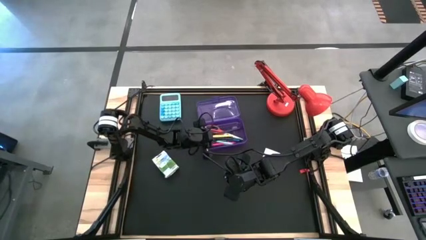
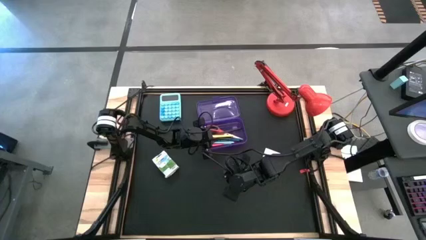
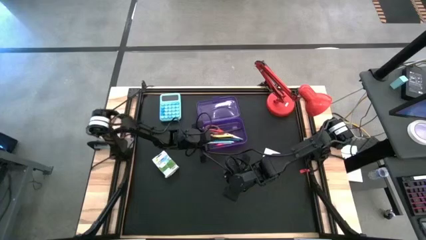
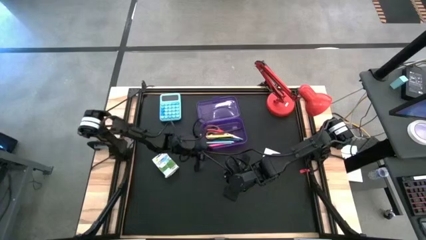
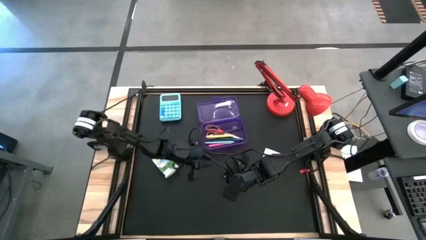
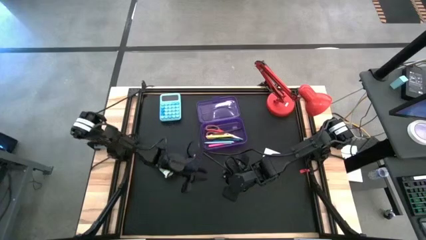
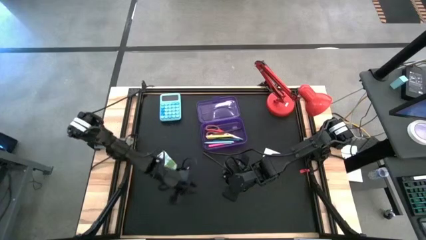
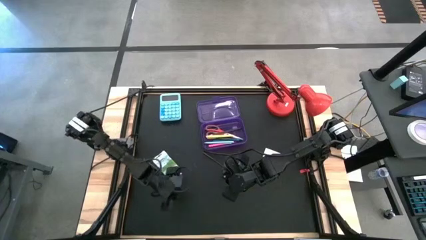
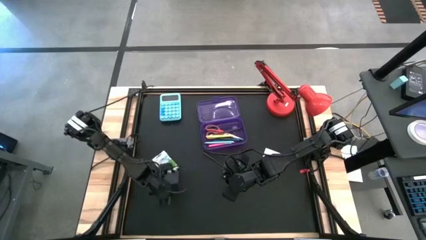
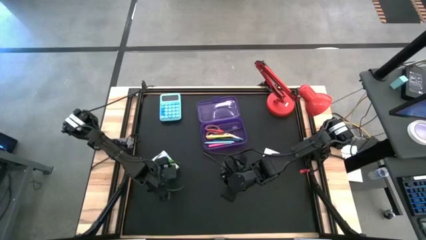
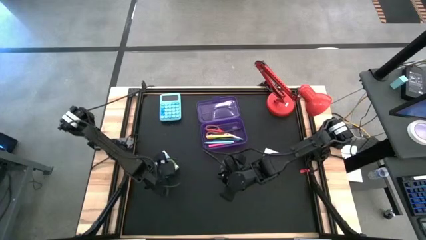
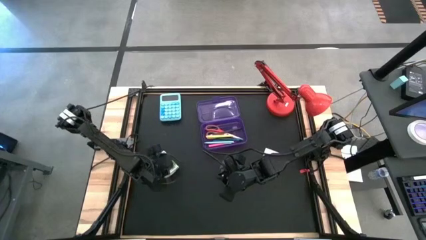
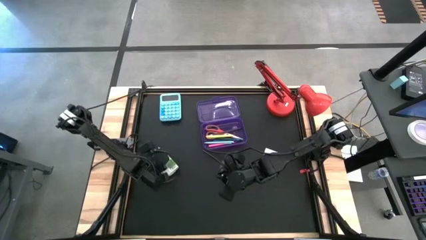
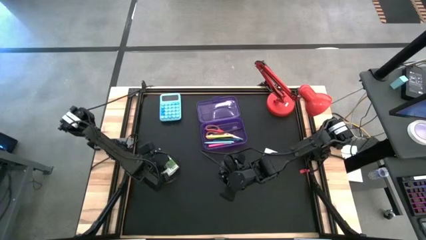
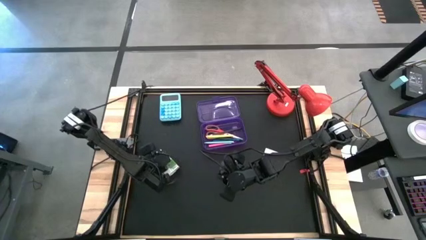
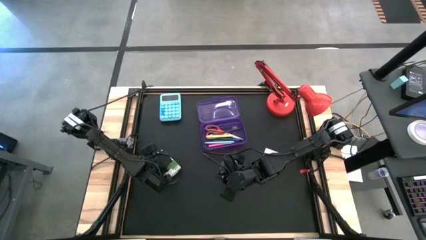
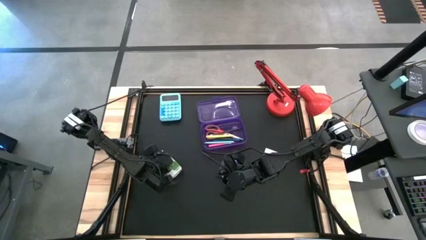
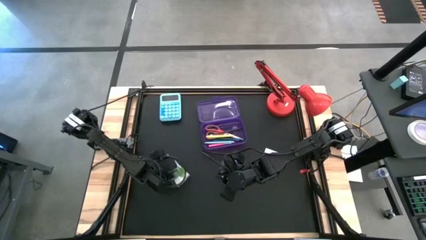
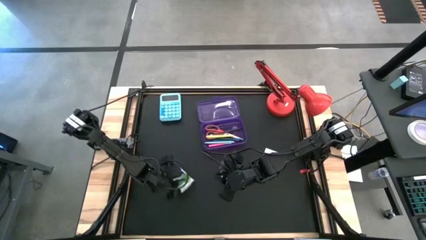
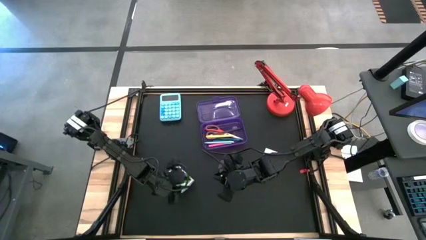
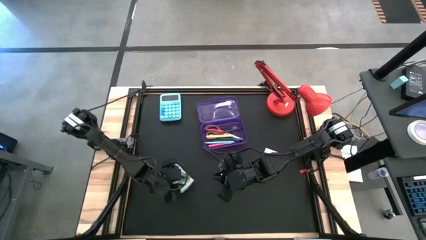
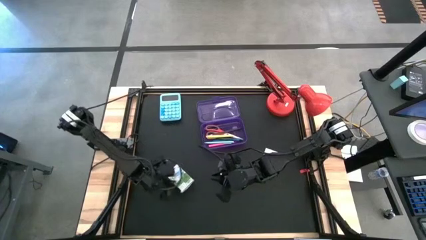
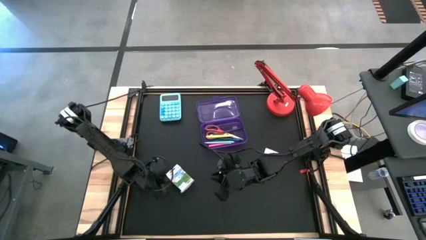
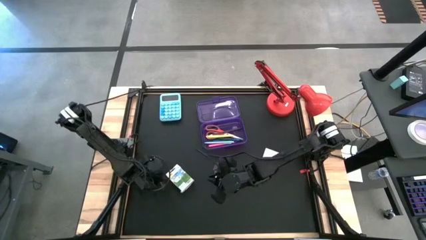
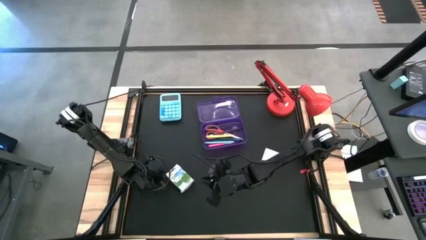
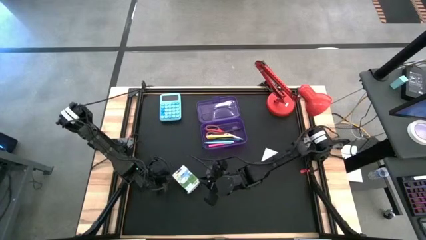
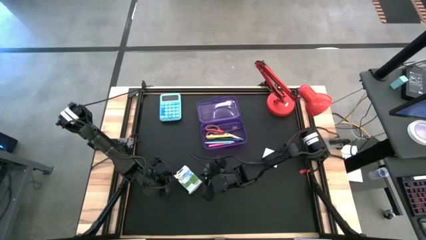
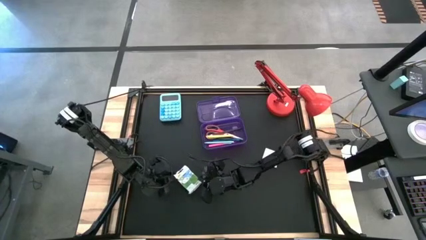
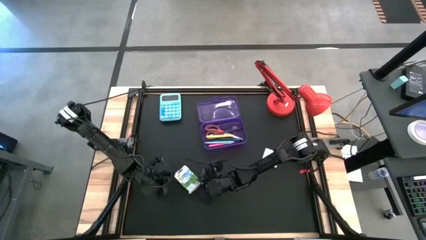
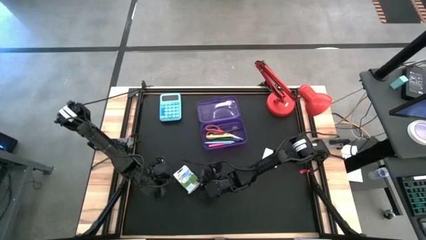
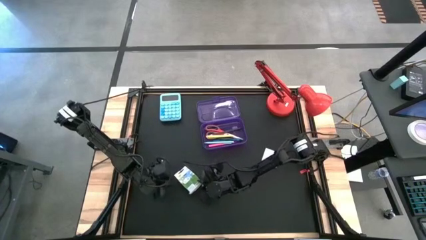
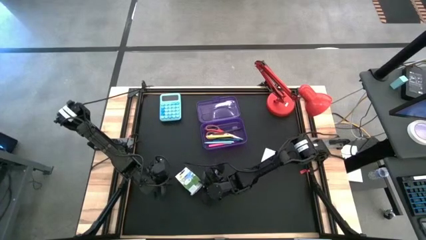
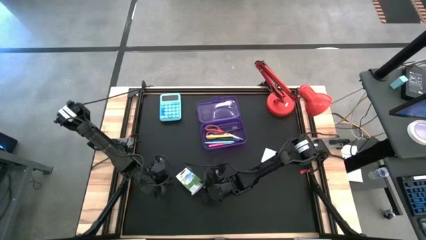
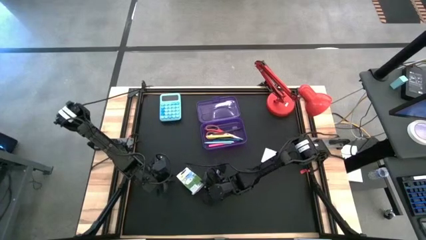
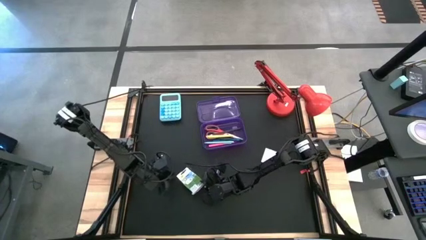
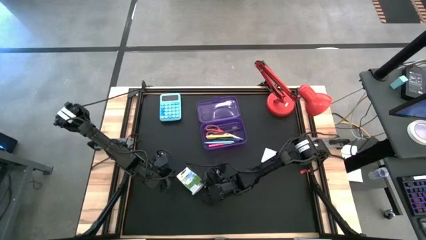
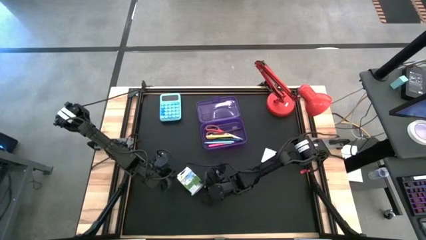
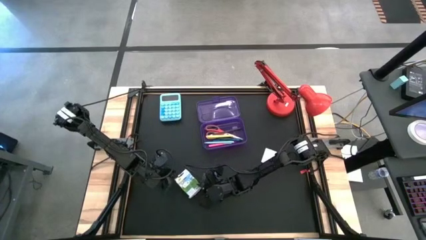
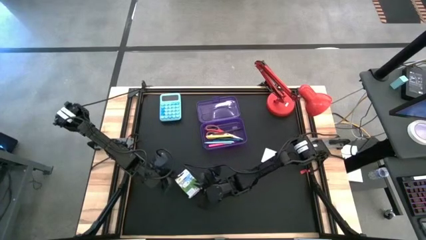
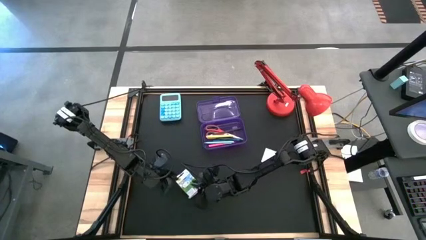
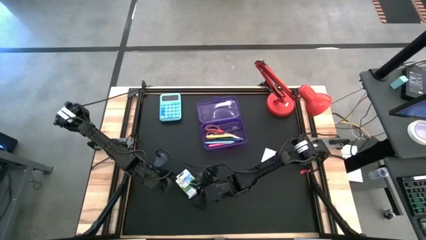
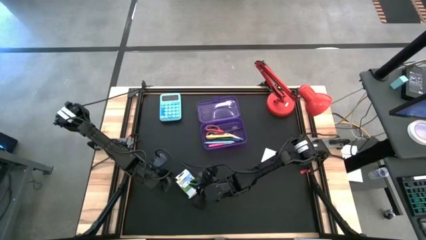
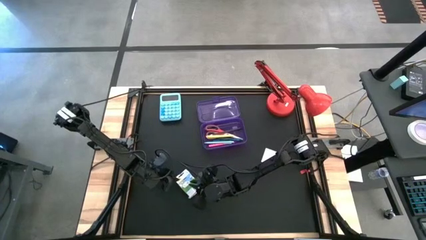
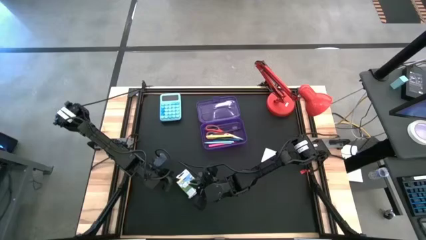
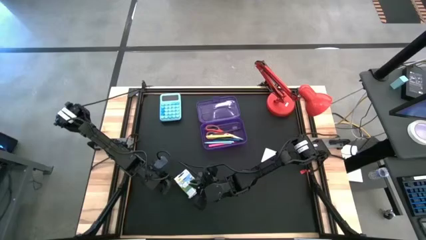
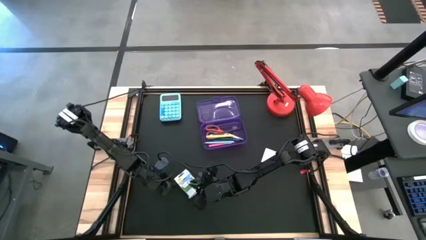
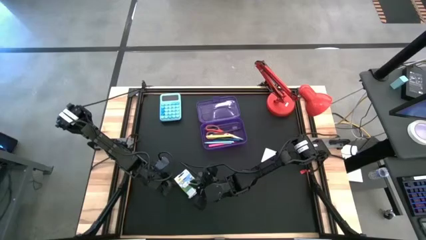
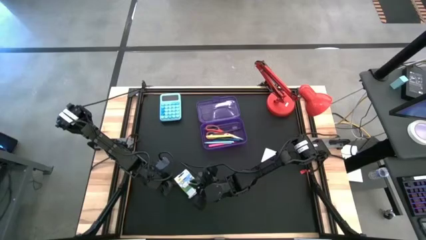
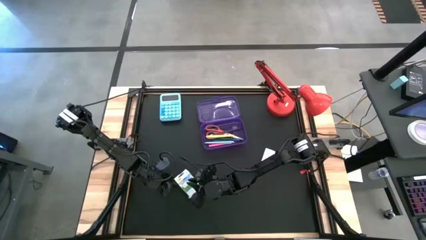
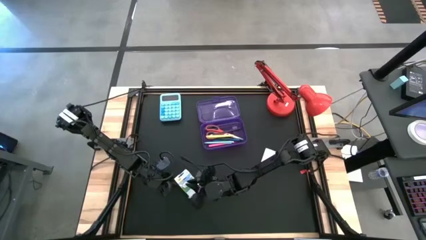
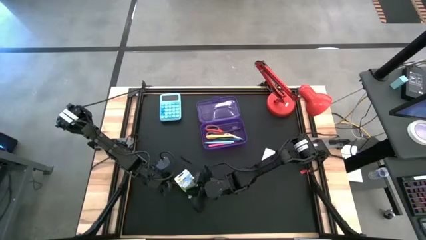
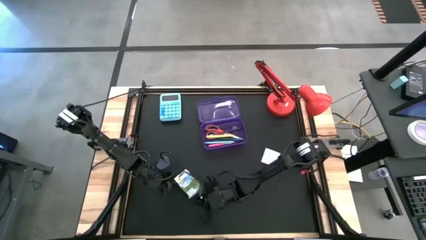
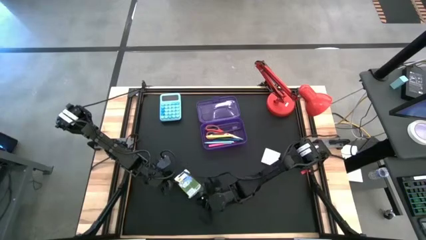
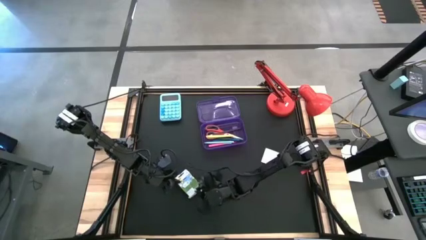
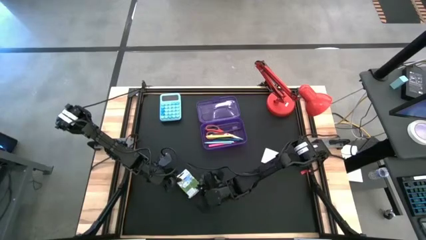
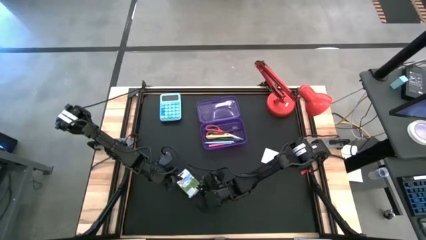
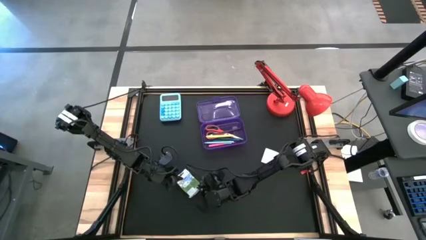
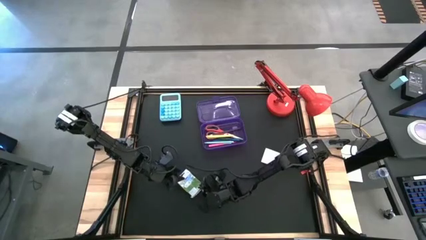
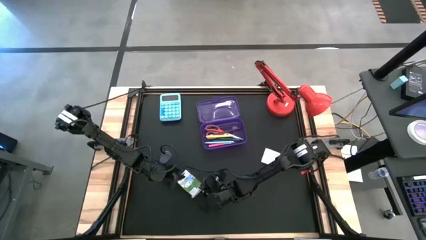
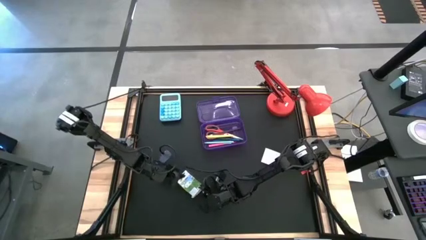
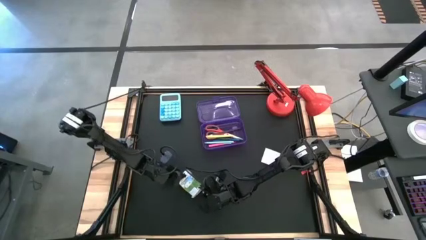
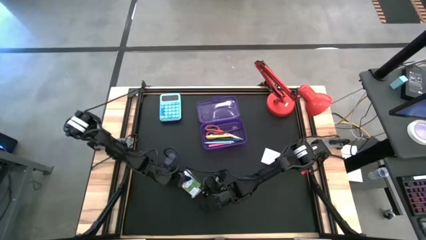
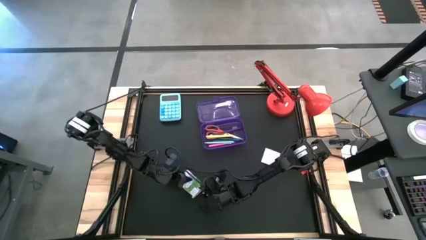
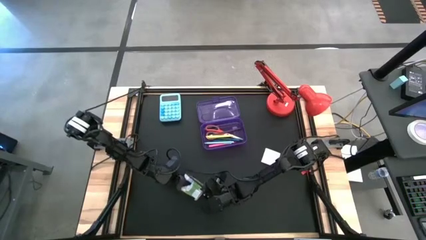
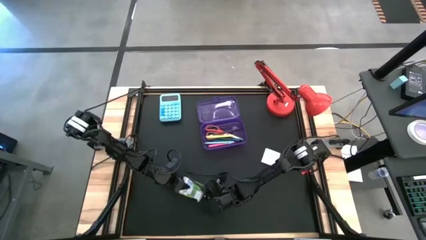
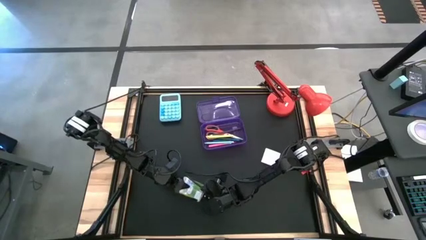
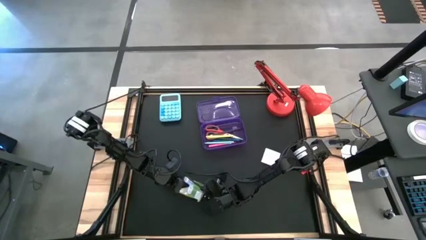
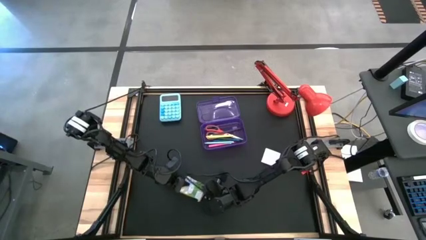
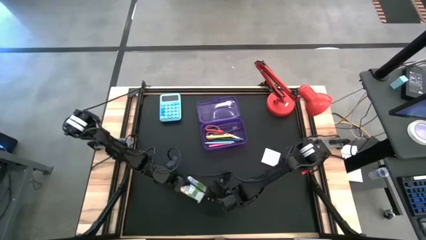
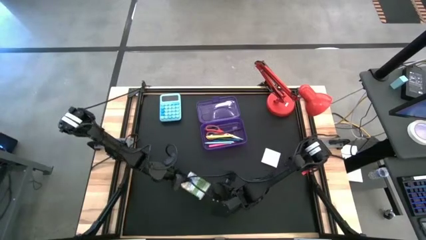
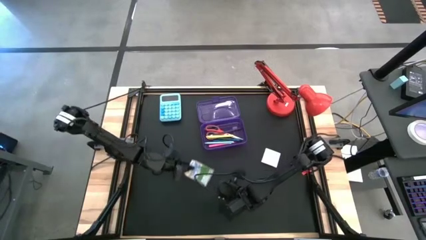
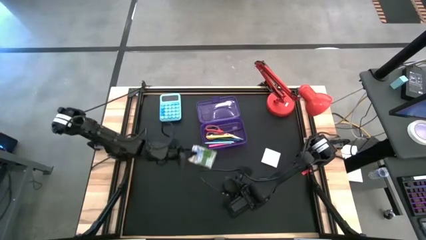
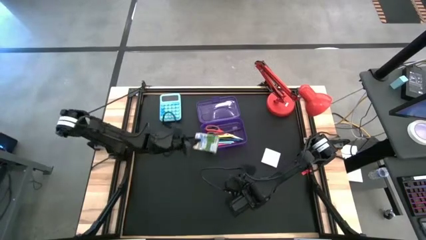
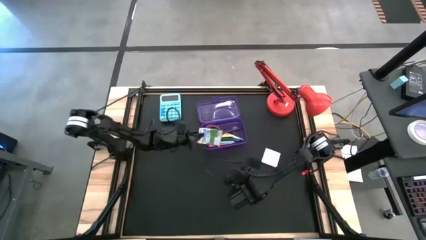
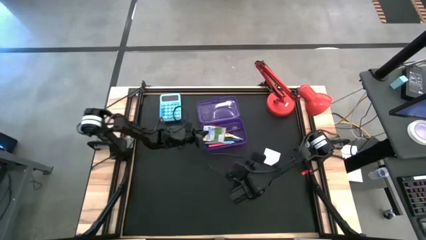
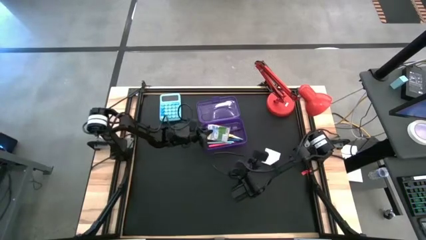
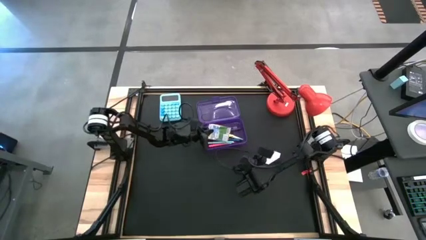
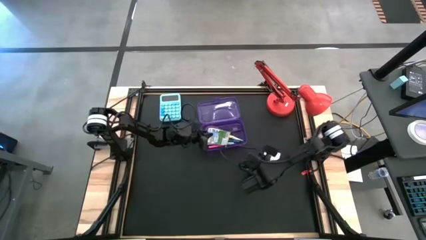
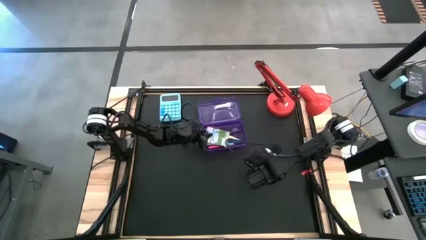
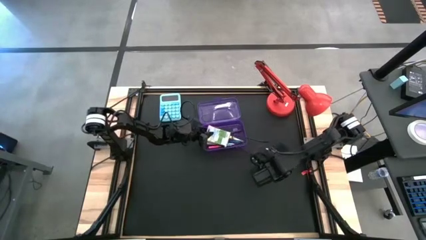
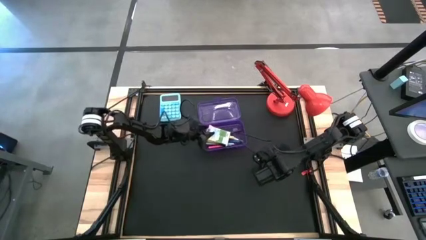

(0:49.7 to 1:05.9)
Task: Pack school essentials
Put the white crayon box into the violet supply box
